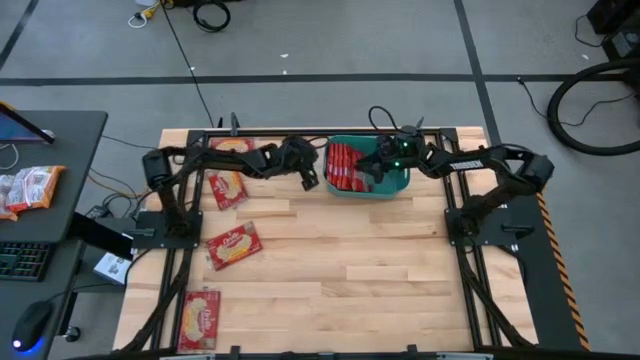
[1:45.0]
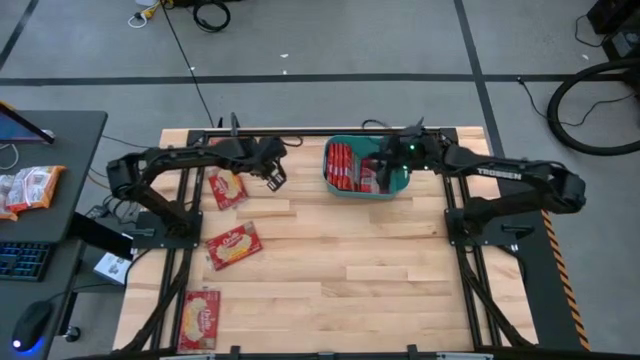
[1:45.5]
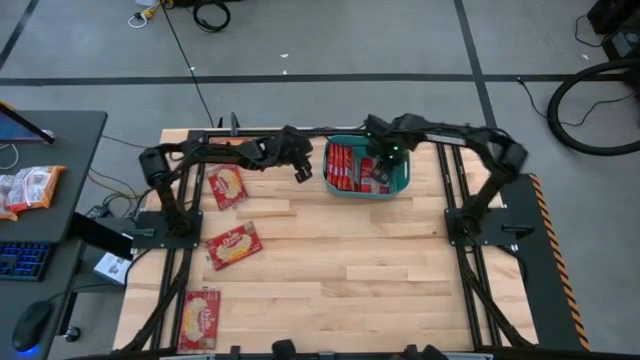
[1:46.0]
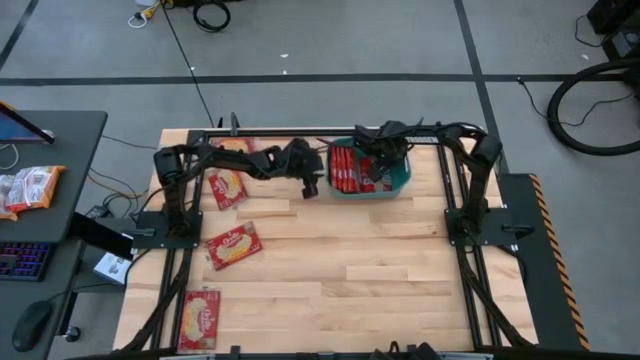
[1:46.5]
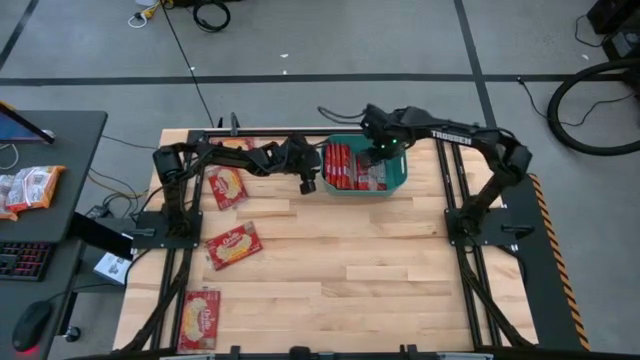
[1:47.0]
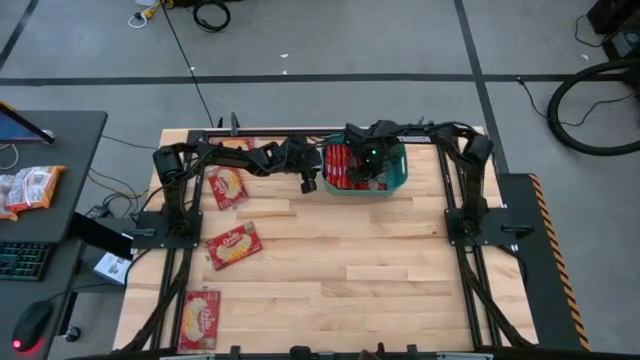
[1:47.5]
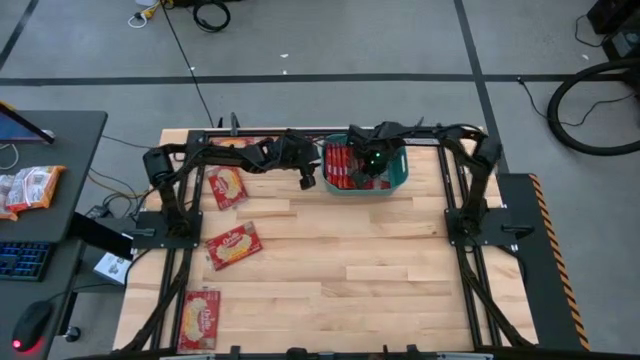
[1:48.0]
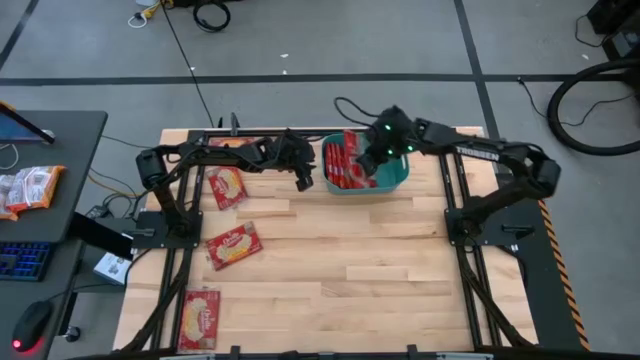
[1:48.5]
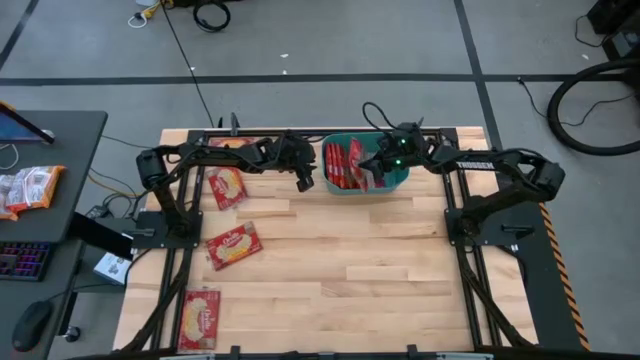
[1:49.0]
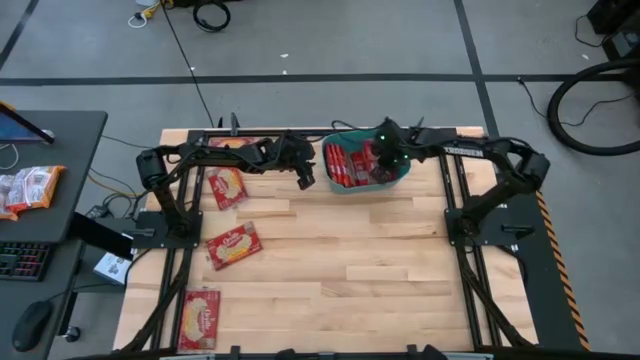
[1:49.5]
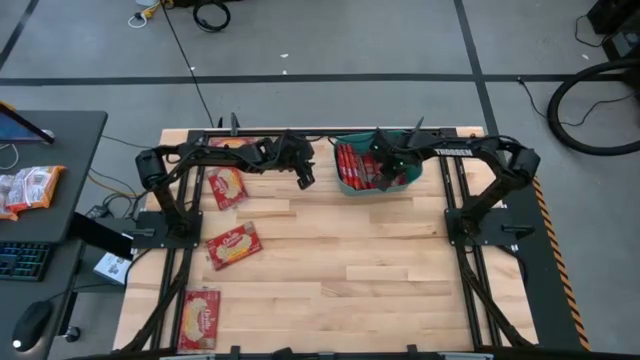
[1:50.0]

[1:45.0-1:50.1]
Task: Sort popcorn bags into baskets
Put the popcorn bag into the bin

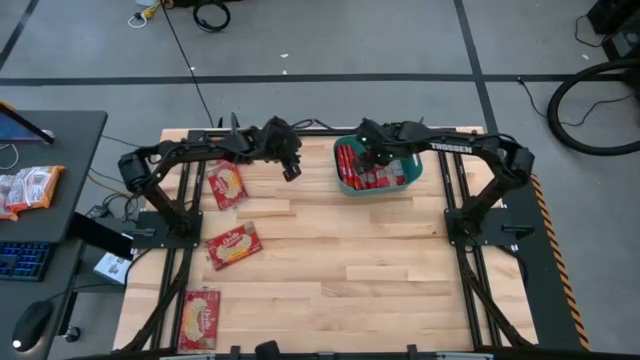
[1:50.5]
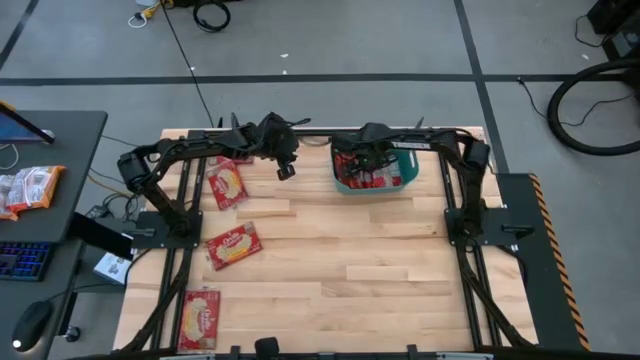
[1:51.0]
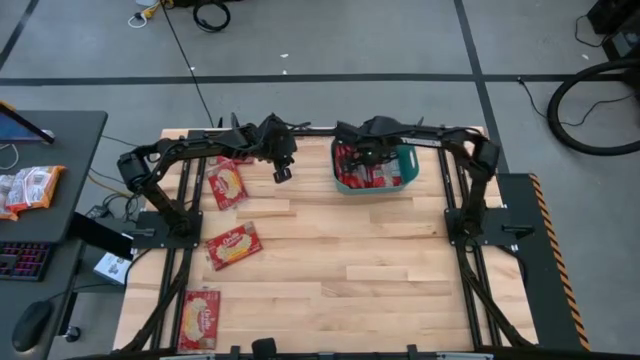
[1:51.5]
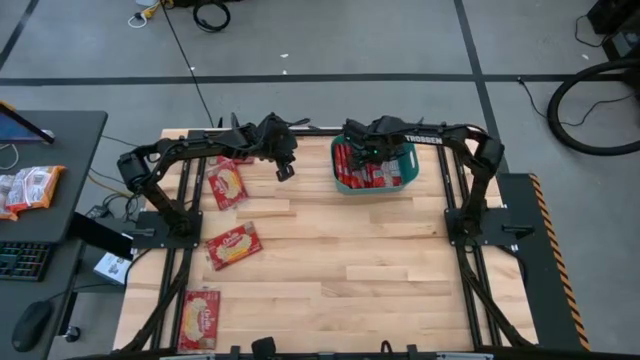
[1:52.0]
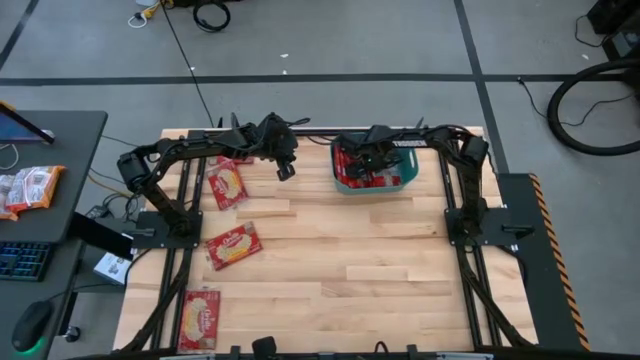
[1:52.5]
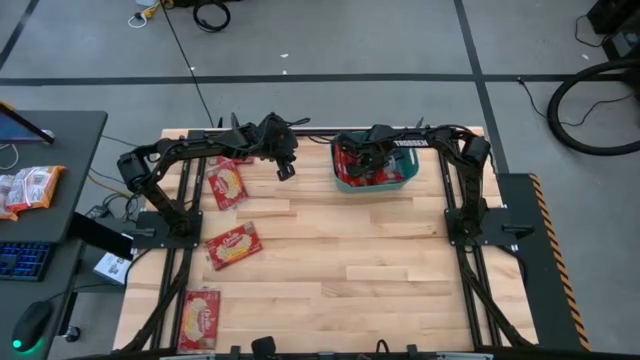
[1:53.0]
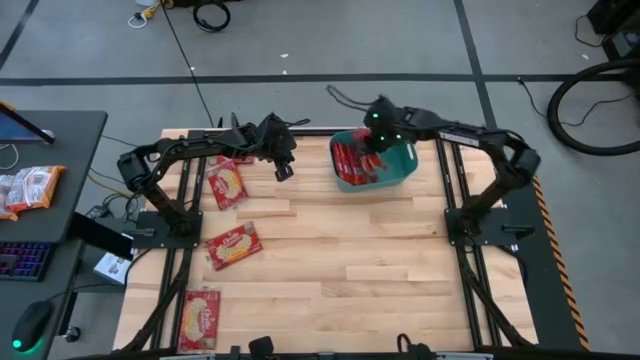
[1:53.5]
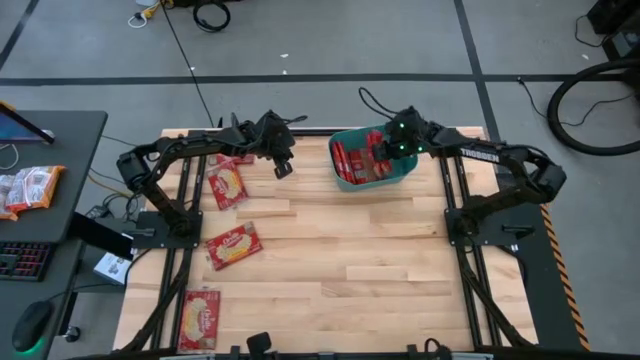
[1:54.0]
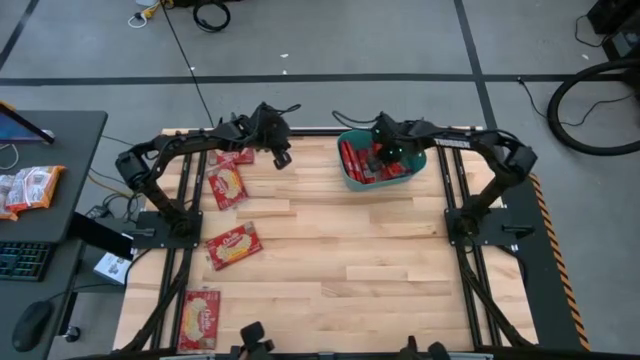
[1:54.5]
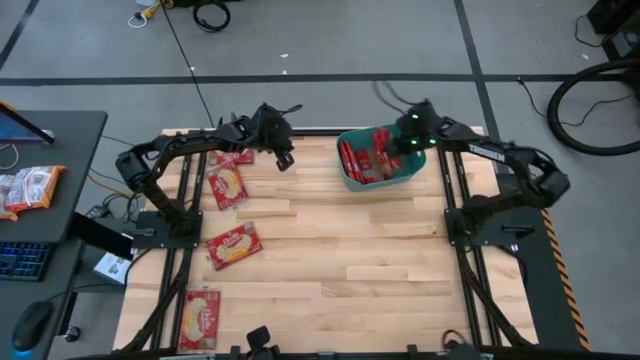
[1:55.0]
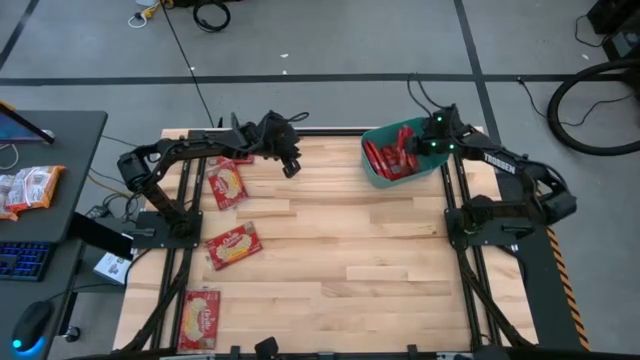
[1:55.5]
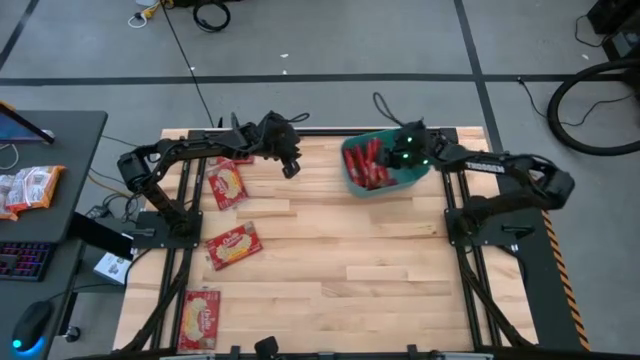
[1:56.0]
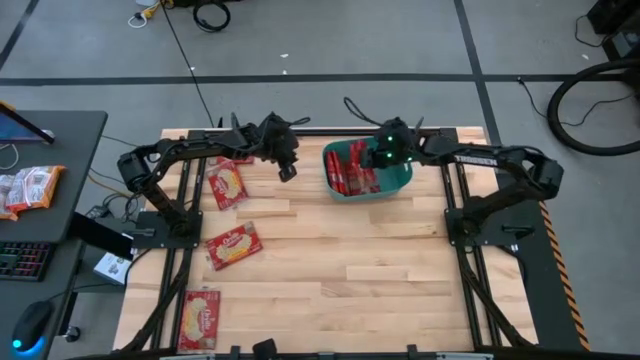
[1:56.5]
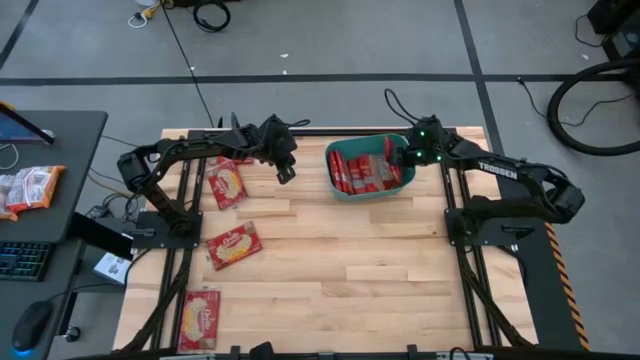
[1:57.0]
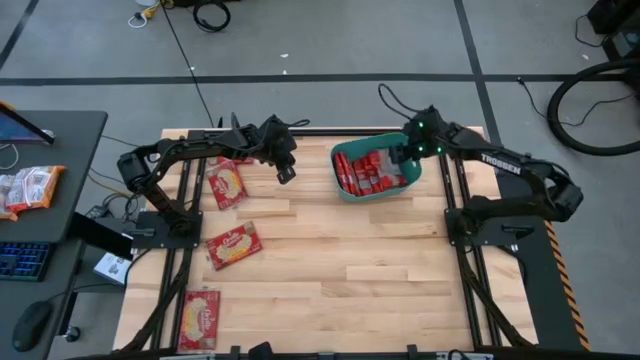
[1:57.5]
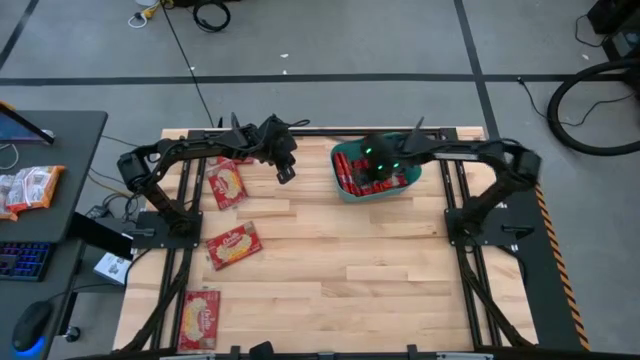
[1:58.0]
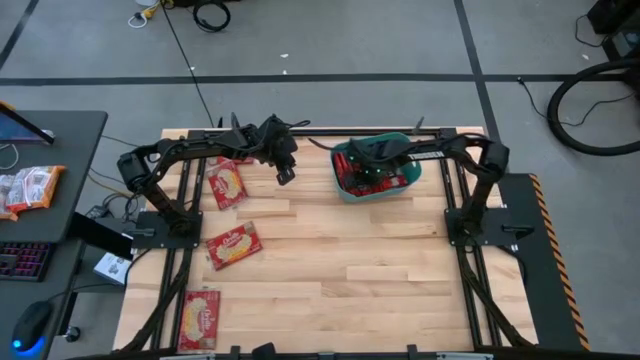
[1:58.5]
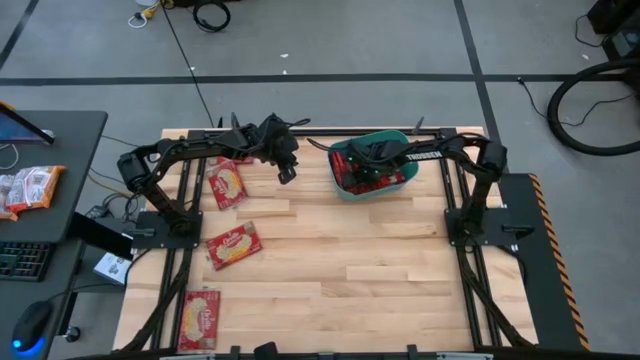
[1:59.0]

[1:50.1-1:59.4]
Adjust the popcorn bags in the bin

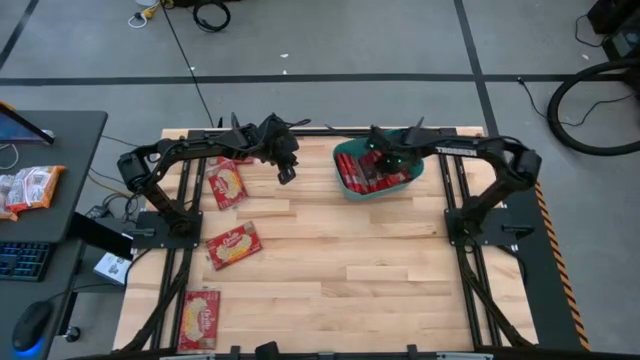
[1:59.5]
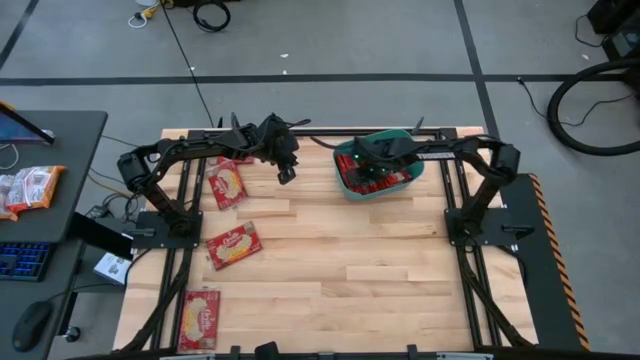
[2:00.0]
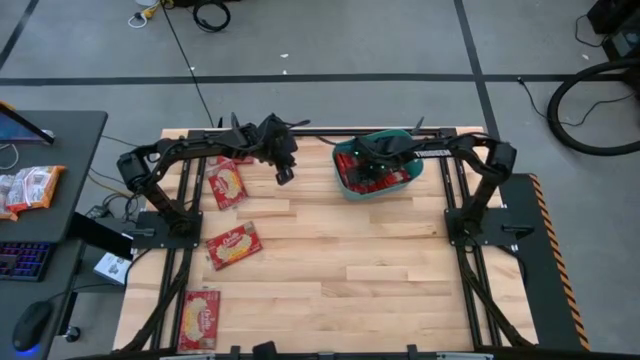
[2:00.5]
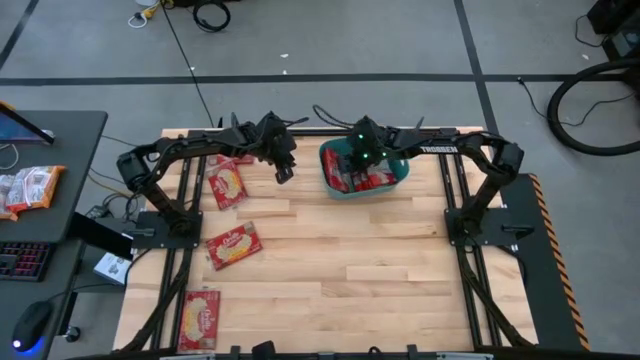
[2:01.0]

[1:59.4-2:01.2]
Adjust the popcorn bags in the bin
